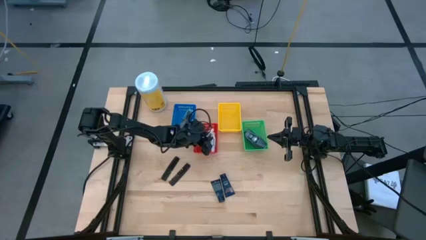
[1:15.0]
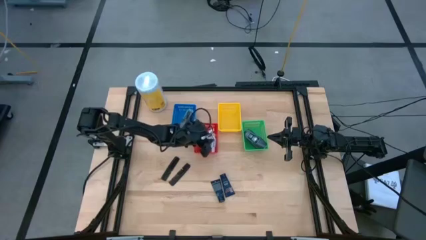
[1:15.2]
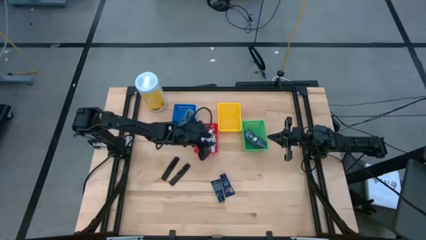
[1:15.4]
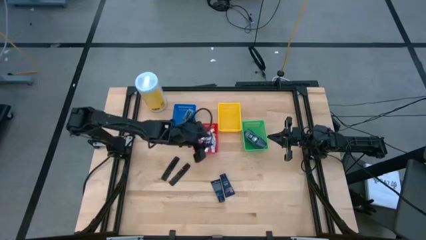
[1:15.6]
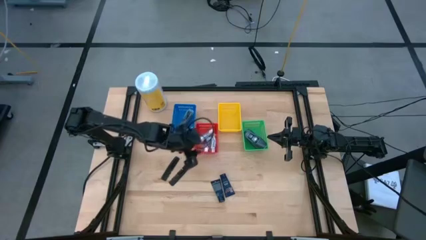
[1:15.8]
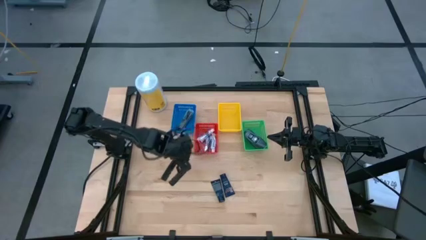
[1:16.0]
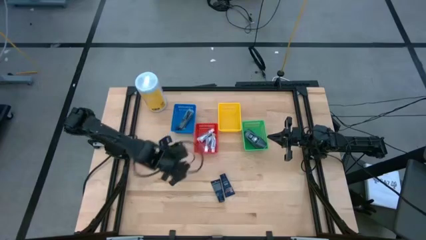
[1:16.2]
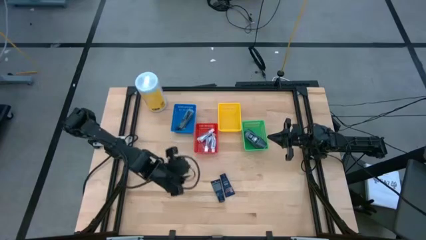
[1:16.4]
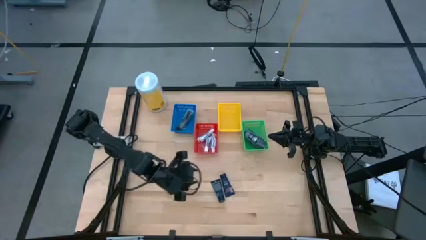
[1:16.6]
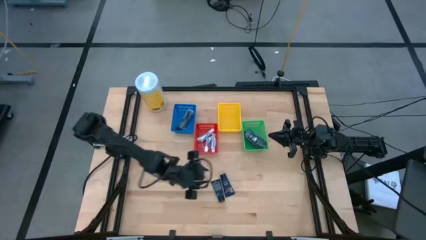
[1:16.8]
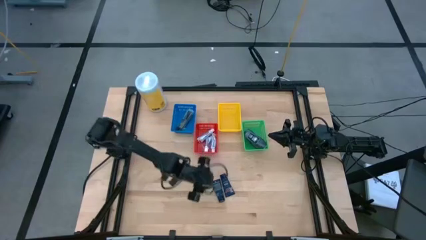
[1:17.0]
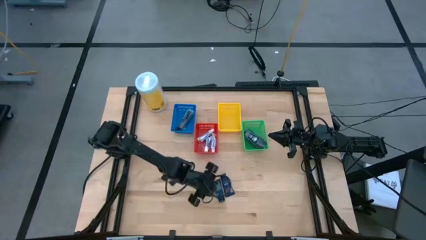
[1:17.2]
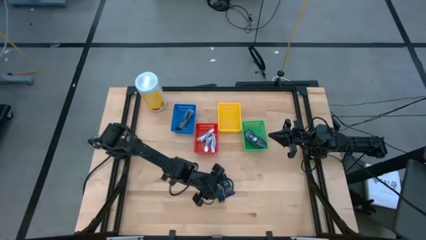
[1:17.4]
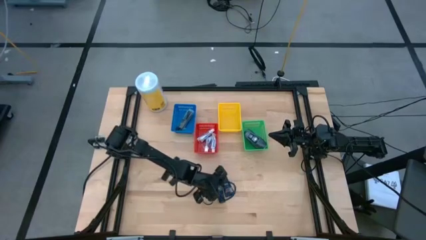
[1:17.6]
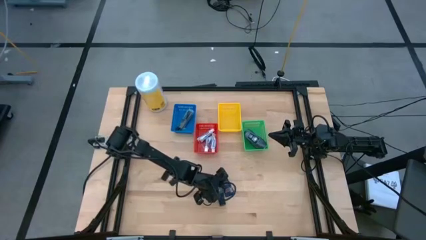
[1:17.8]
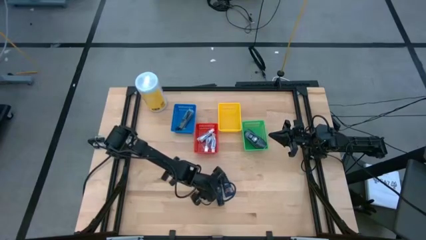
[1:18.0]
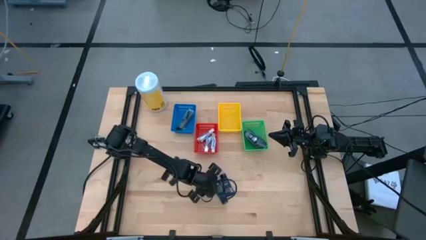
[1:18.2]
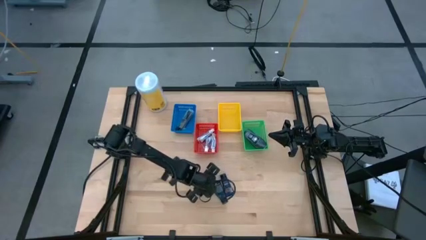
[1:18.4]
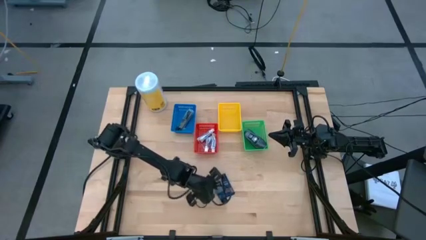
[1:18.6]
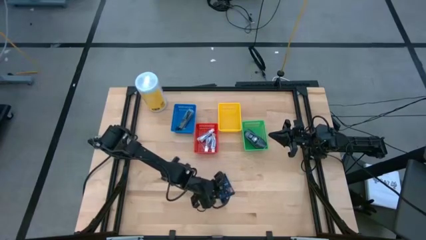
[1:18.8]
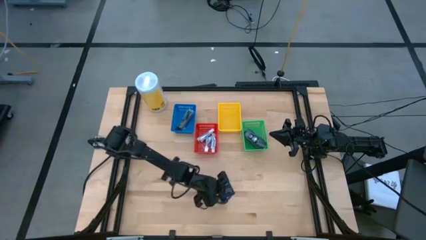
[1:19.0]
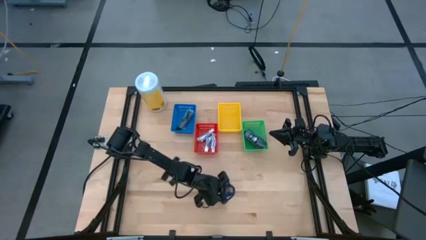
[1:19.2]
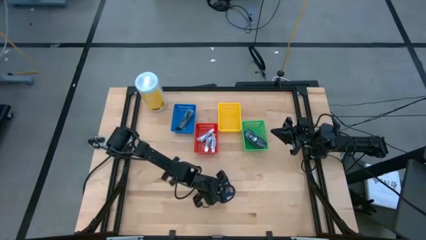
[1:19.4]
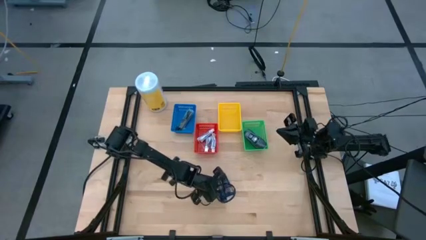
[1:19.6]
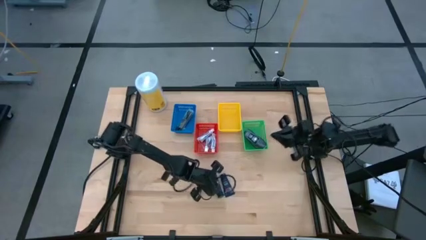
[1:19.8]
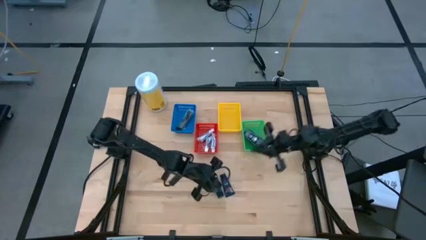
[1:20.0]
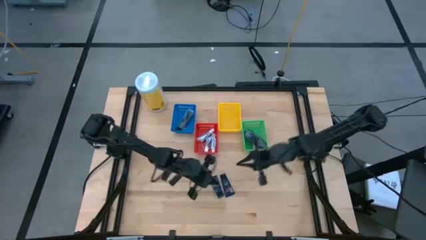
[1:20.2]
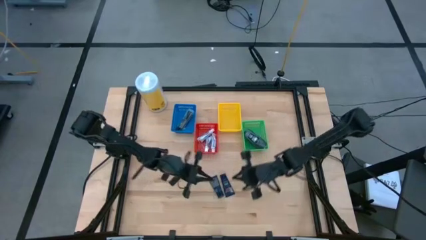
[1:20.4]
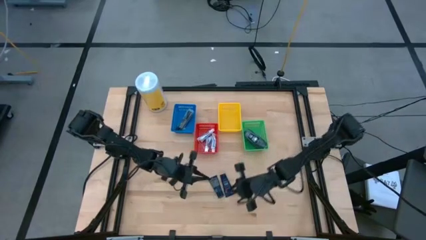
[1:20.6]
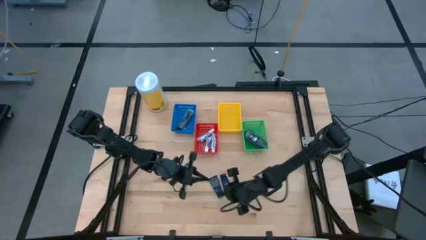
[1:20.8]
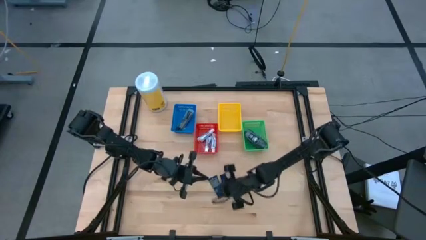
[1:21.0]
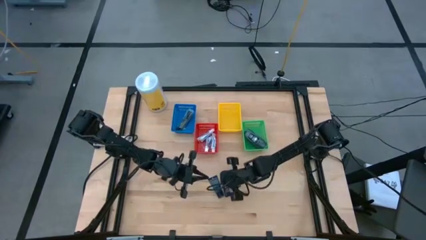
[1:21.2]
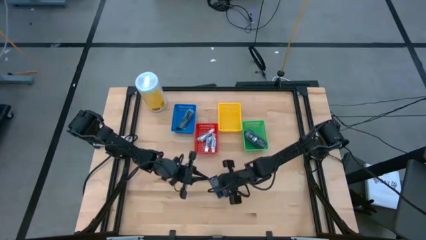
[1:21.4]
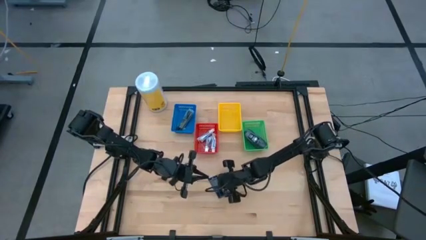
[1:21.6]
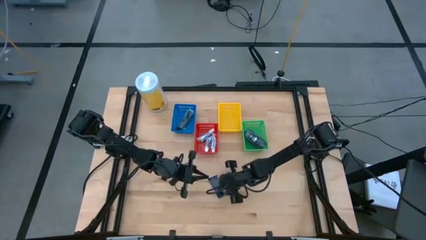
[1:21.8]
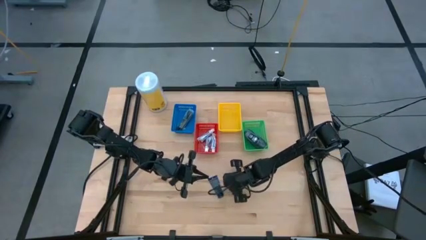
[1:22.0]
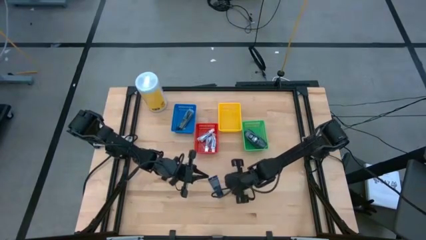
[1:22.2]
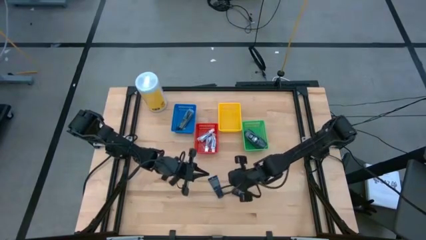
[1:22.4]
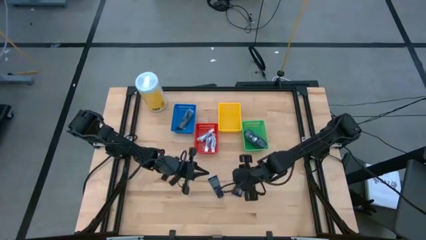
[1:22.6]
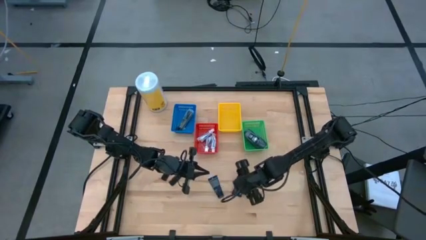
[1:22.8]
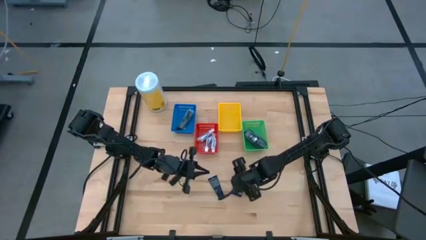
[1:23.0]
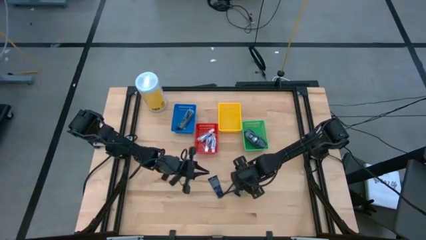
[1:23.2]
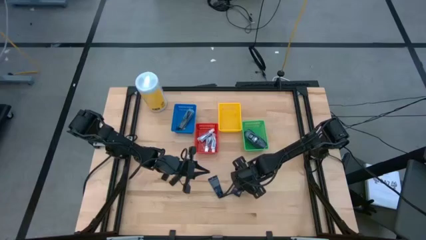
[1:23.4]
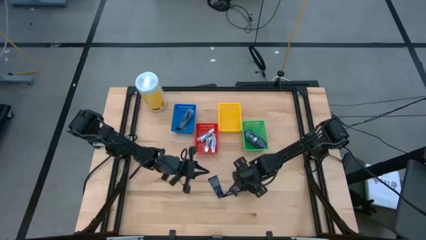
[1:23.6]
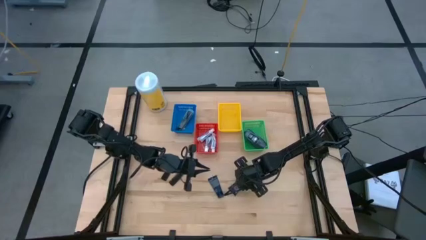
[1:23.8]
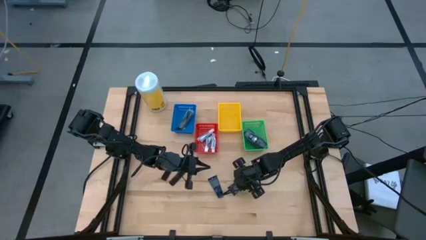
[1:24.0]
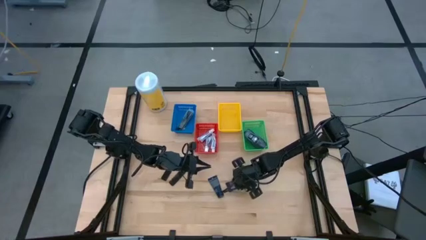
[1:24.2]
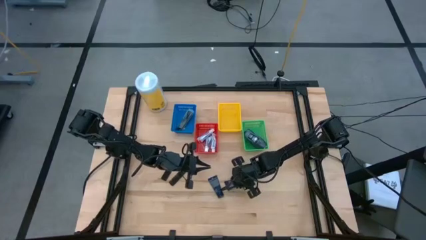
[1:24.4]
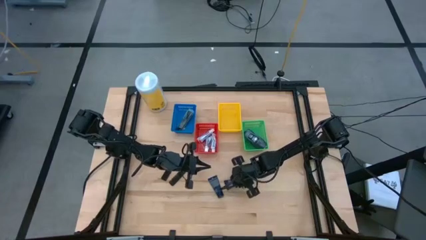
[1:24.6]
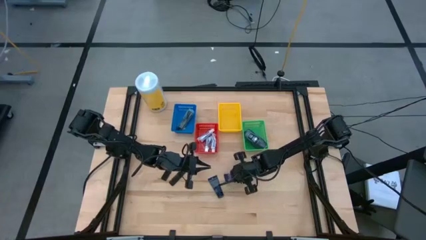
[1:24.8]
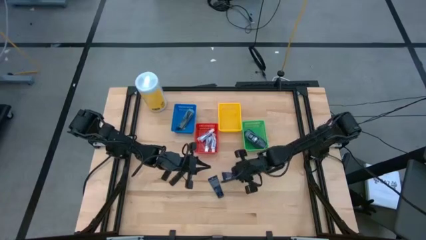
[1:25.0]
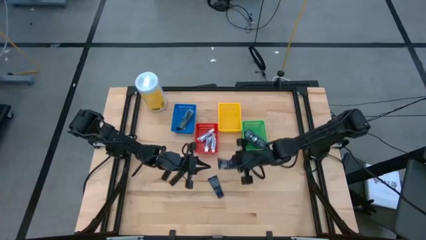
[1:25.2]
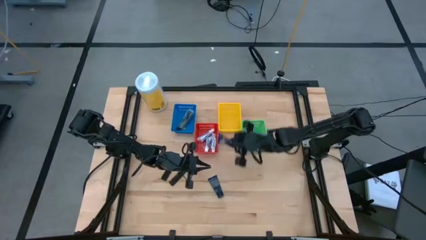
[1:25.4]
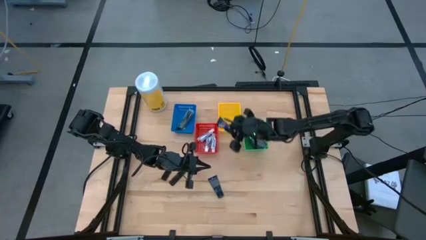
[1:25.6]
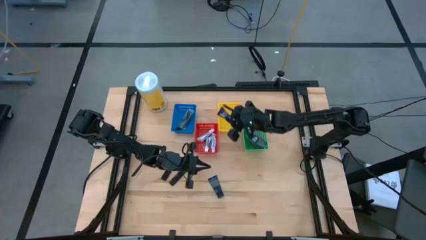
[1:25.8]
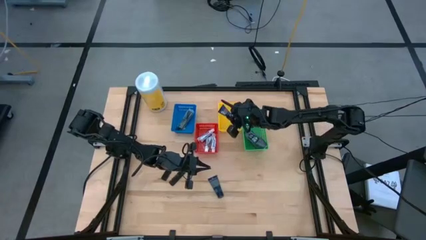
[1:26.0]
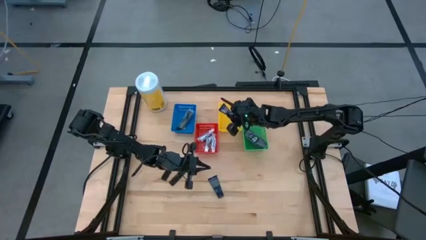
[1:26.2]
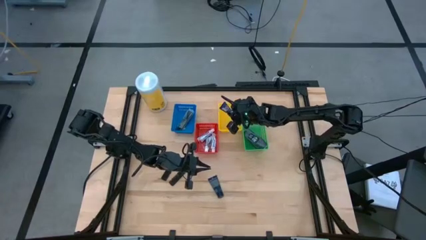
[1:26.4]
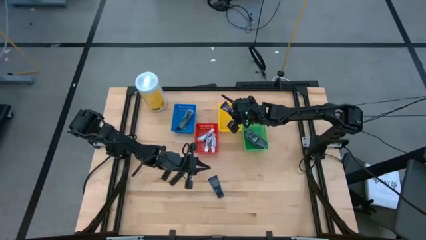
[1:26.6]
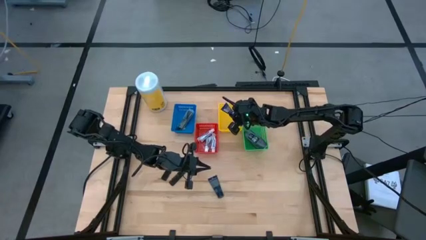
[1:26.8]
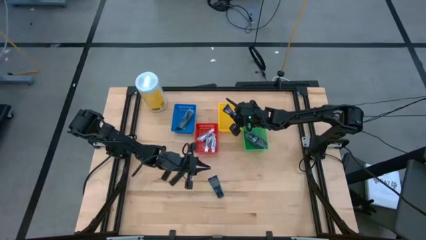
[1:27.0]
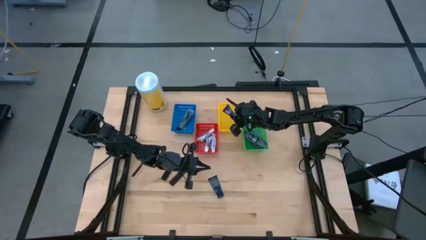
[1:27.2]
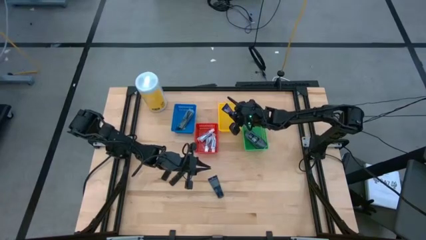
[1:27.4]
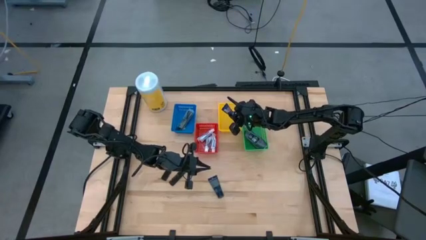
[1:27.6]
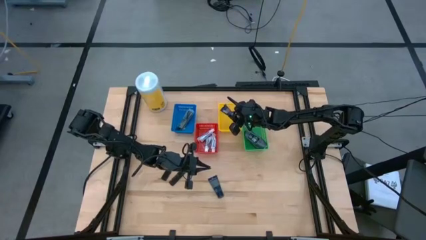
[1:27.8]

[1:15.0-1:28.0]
Task: Pick & Place Travel size toiletries
Put the blue shaving cream into the yellow bin
